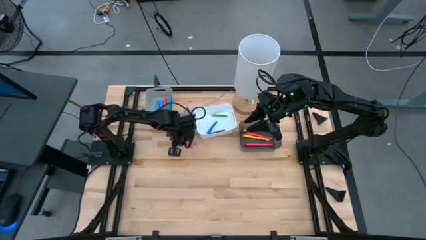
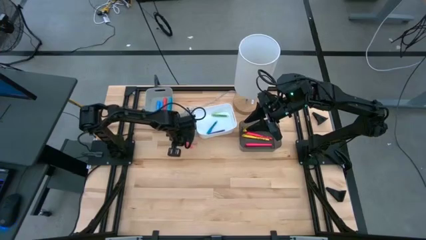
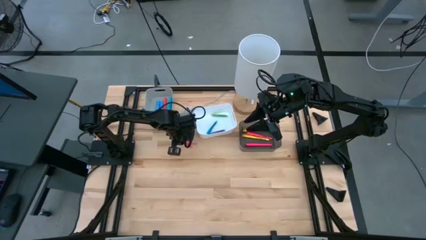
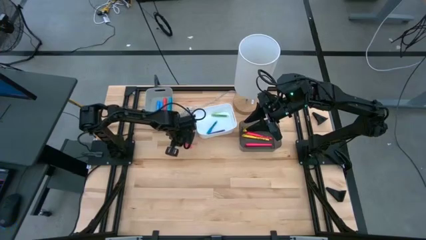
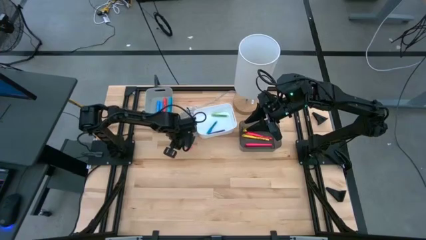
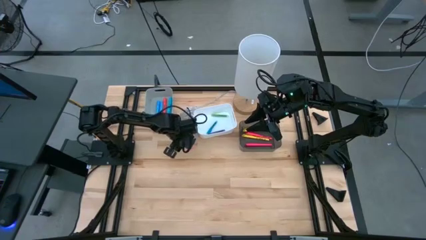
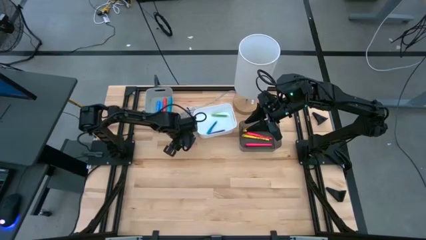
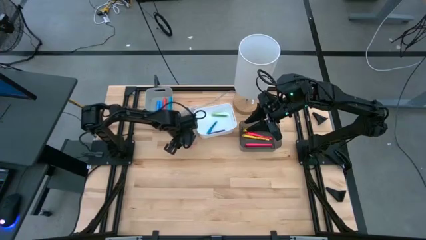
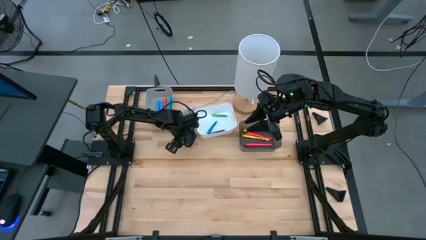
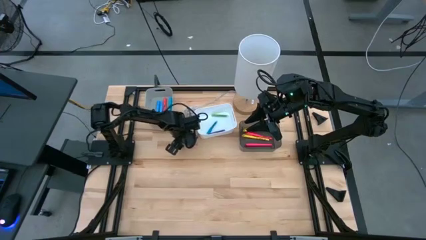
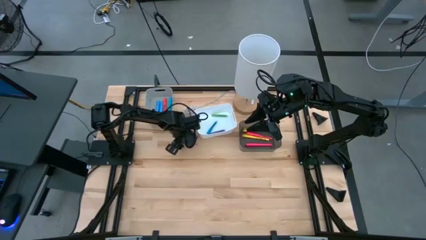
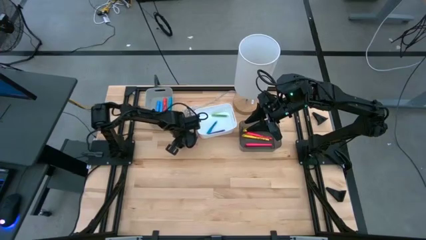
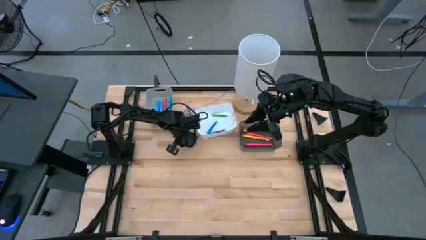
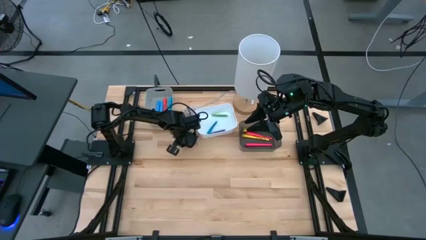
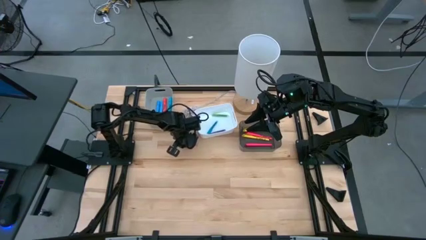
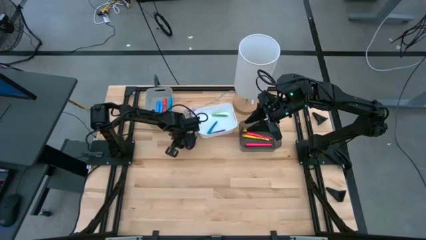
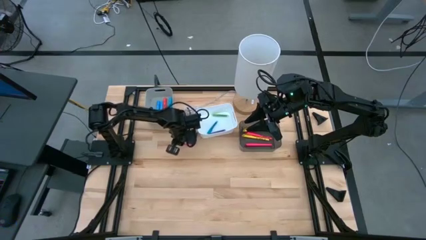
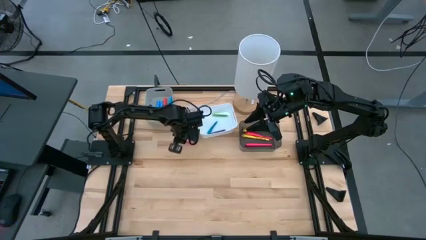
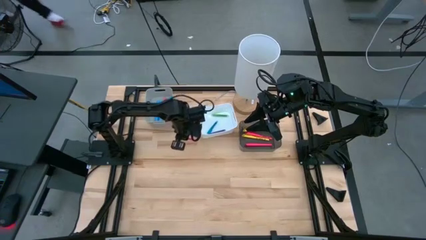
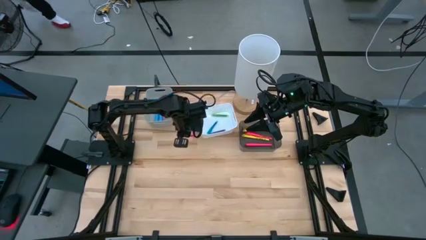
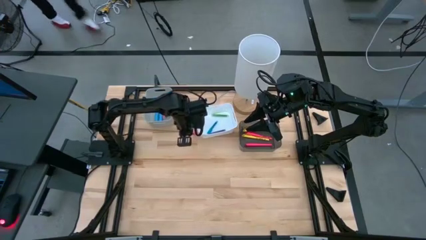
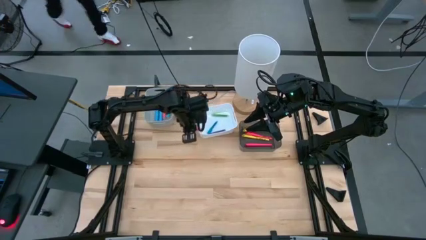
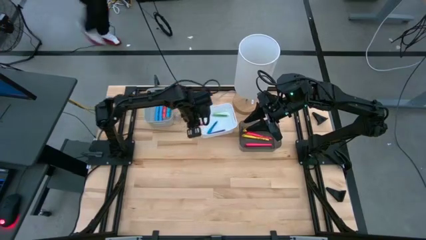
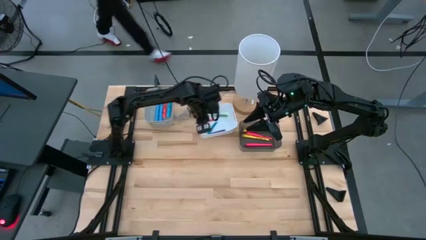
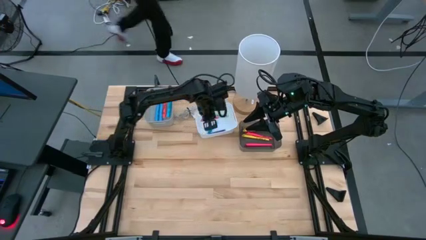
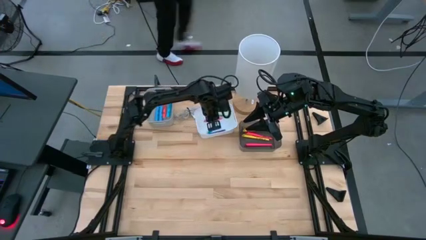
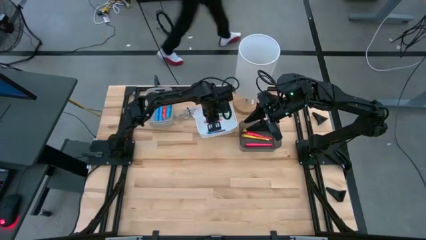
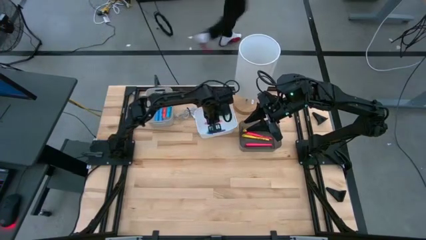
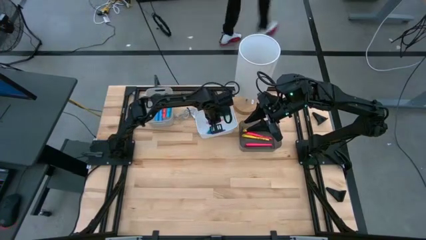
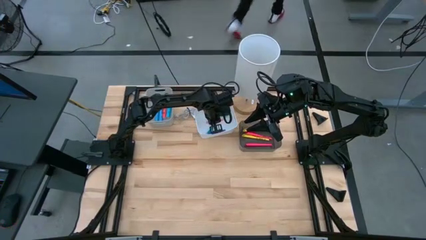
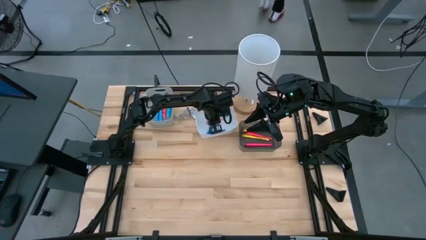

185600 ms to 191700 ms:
Task: Pick & Place Markers
Put the transparent pink pen into the white bin

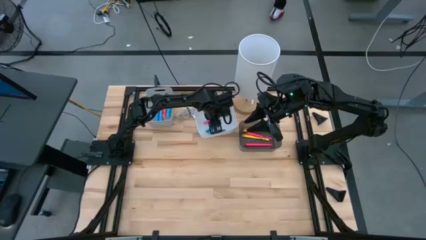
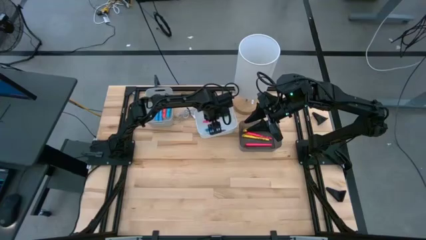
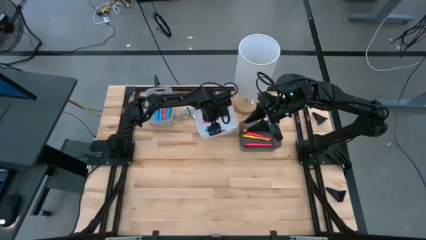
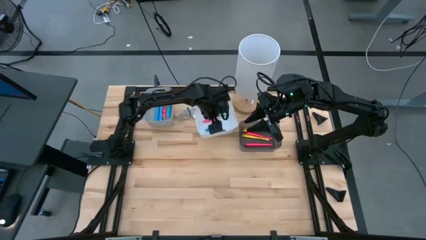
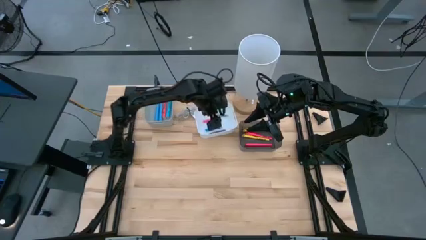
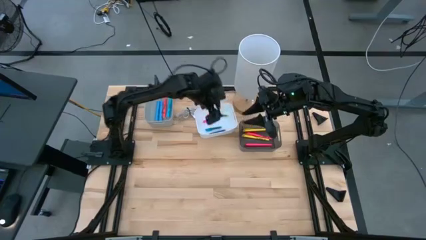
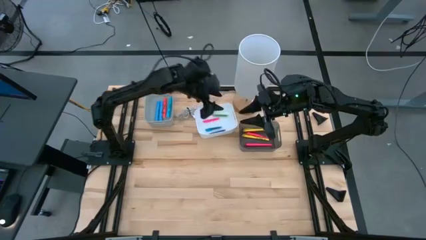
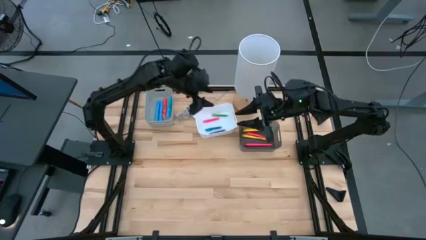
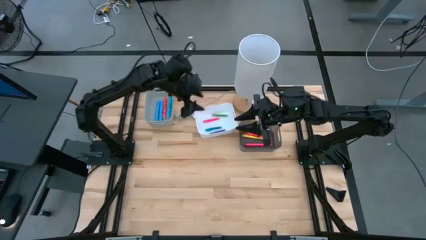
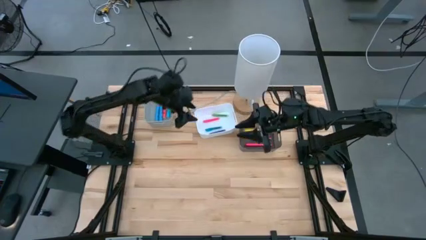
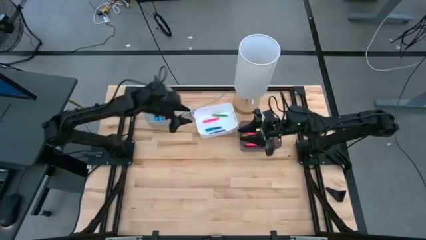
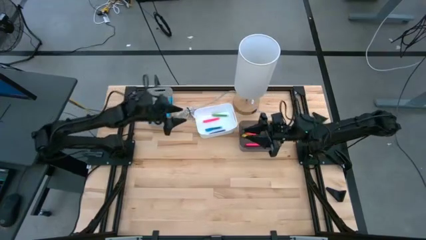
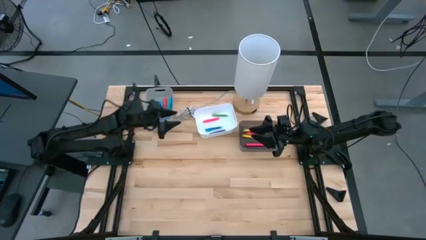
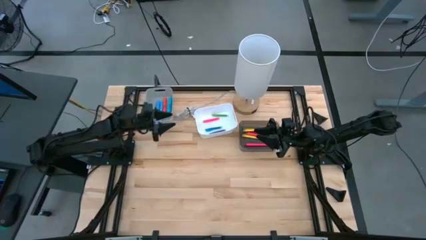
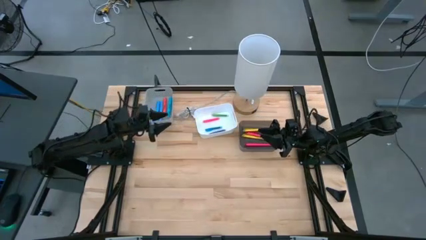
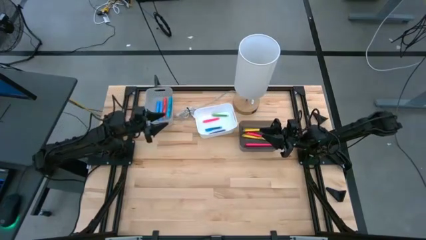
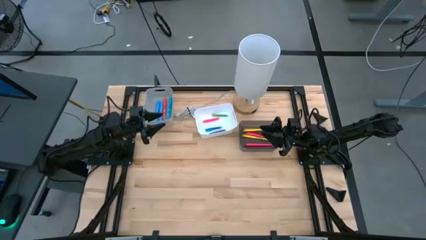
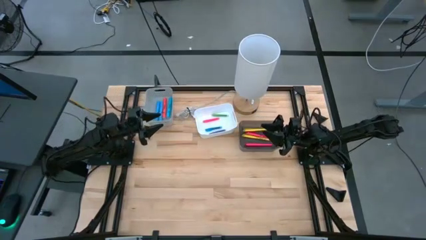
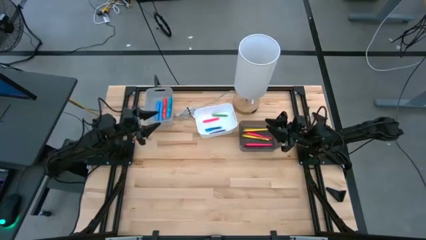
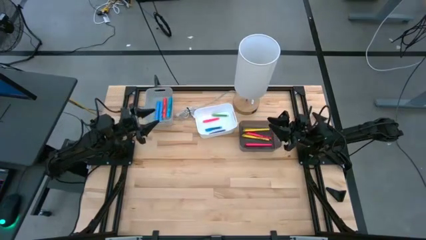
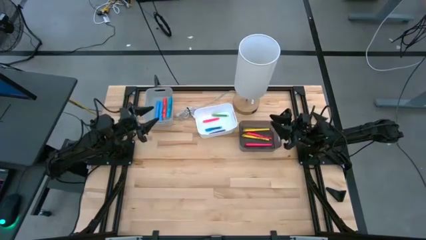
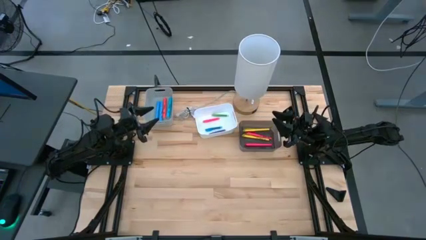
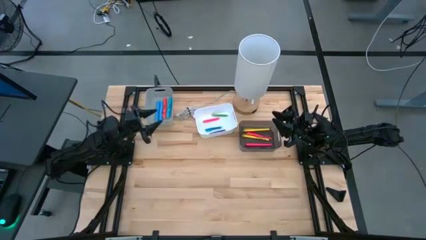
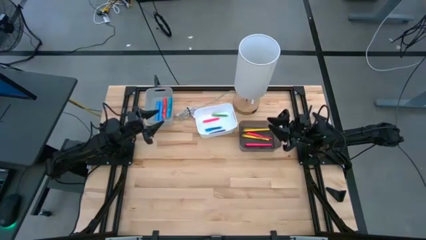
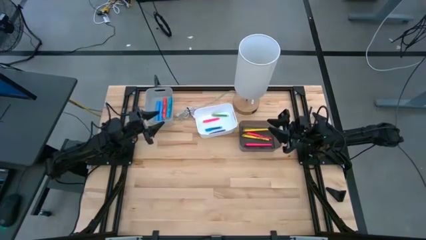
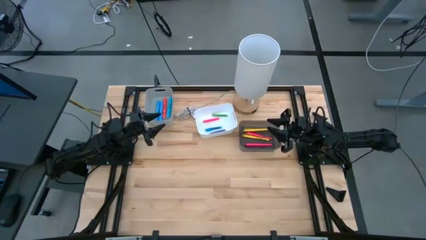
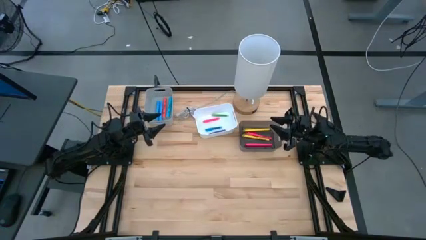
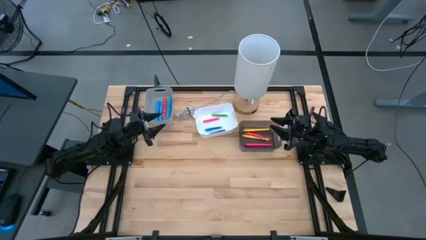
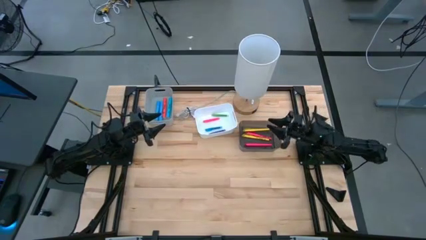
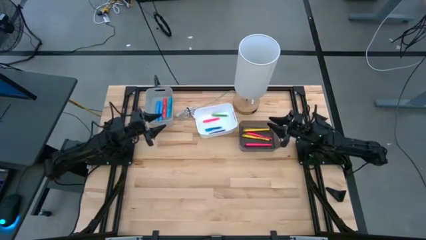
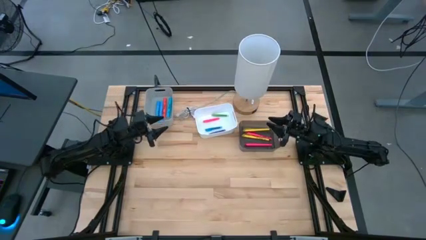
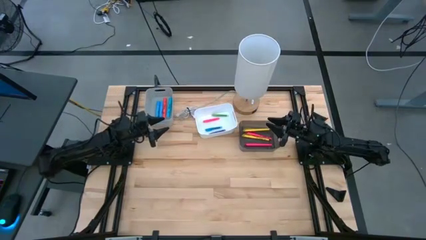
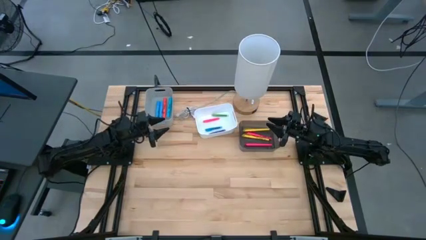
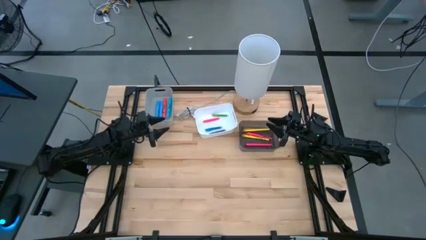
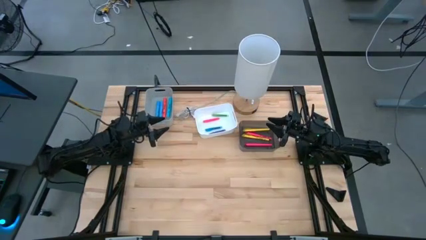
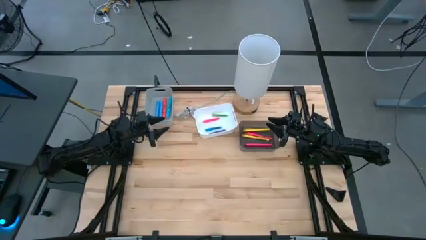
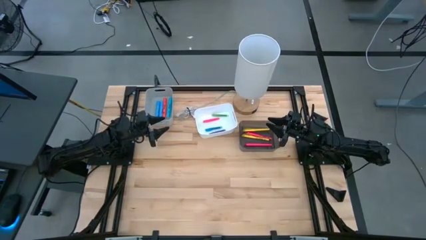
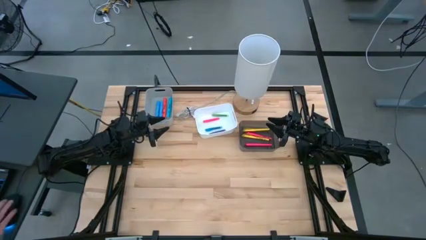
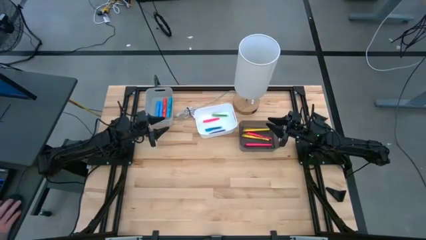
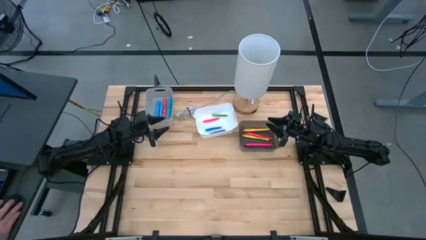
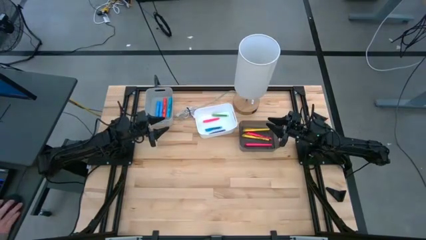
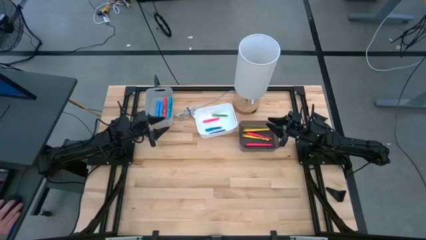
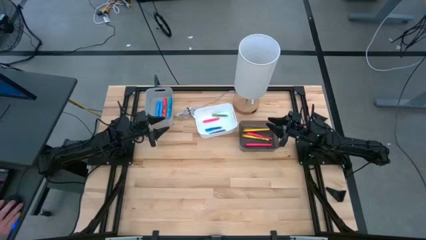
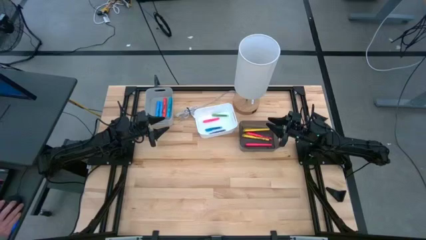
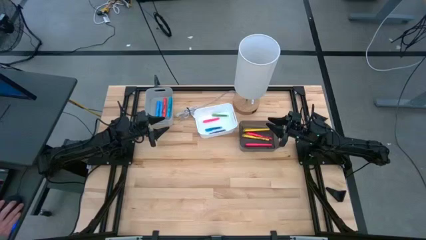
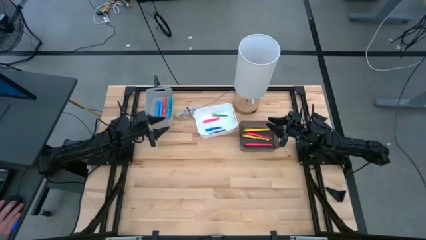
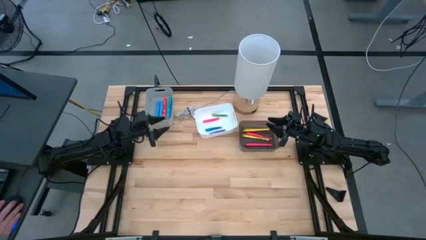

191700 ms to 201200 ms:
Return to Home Position
